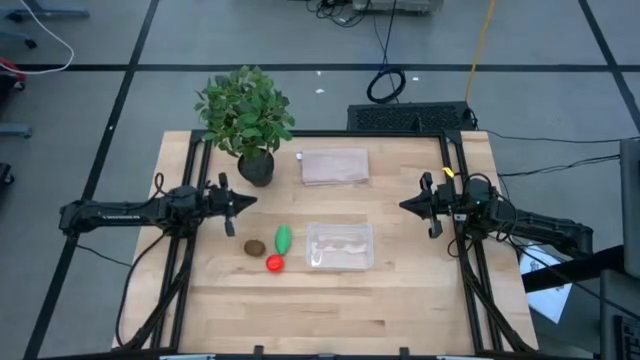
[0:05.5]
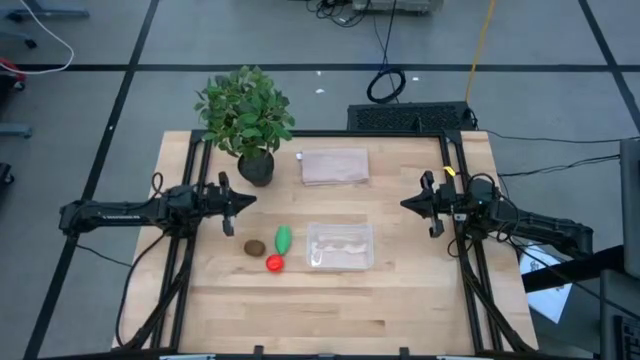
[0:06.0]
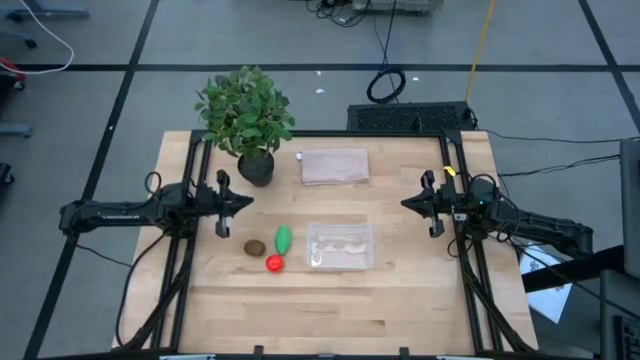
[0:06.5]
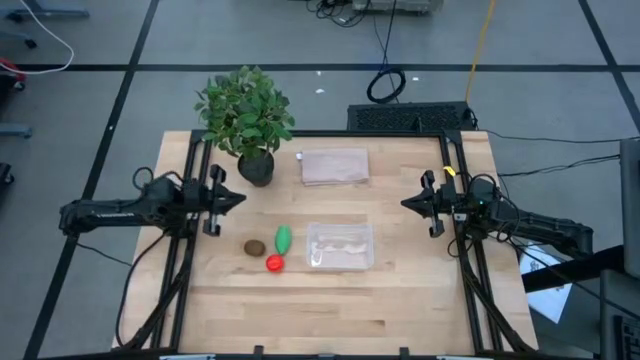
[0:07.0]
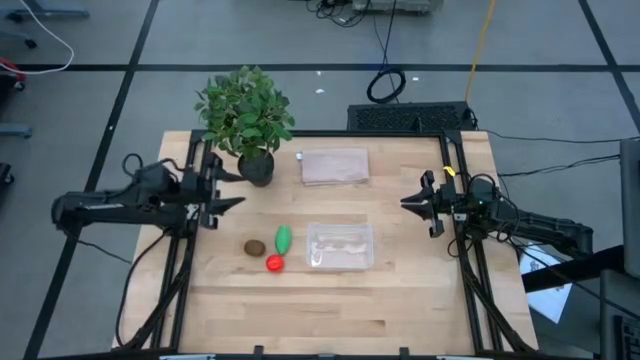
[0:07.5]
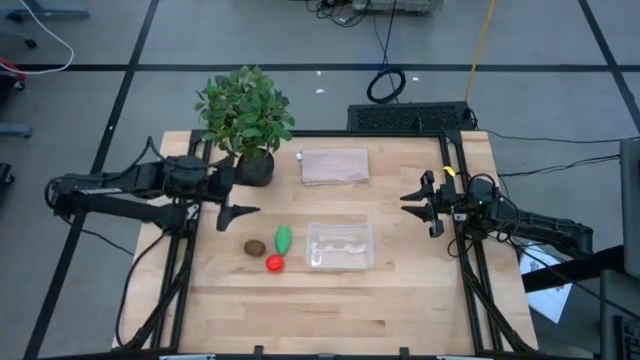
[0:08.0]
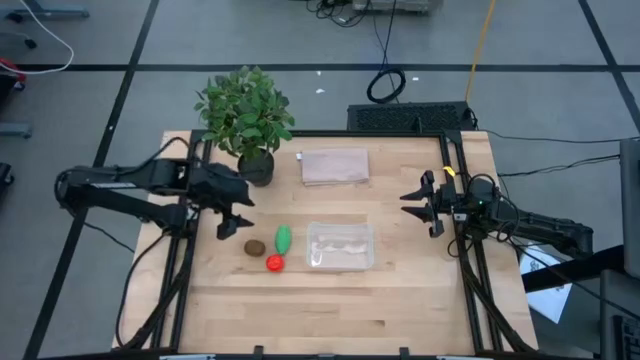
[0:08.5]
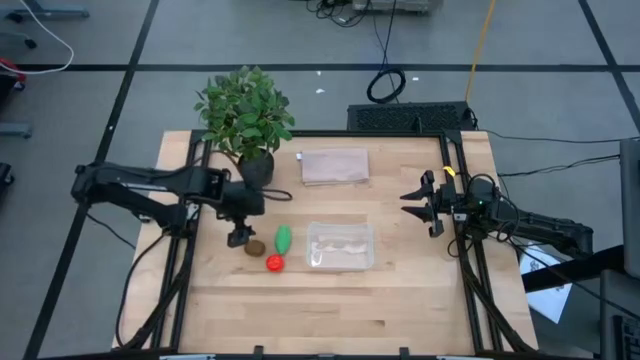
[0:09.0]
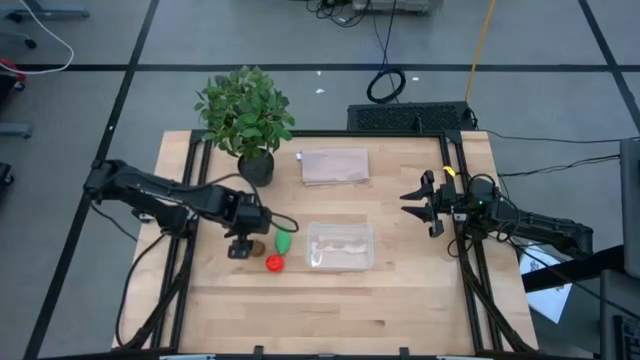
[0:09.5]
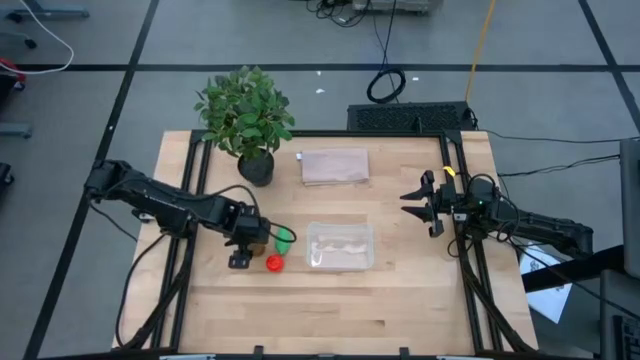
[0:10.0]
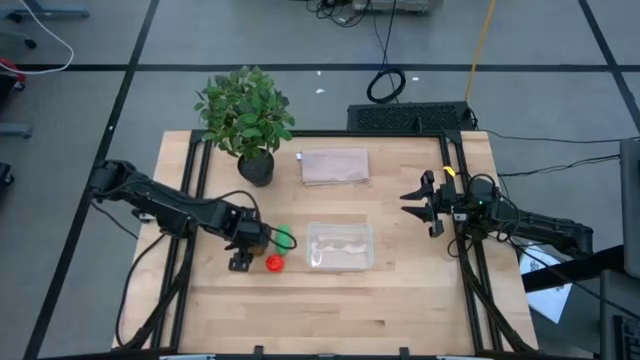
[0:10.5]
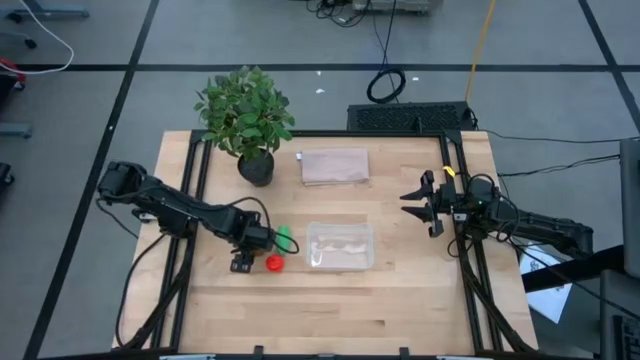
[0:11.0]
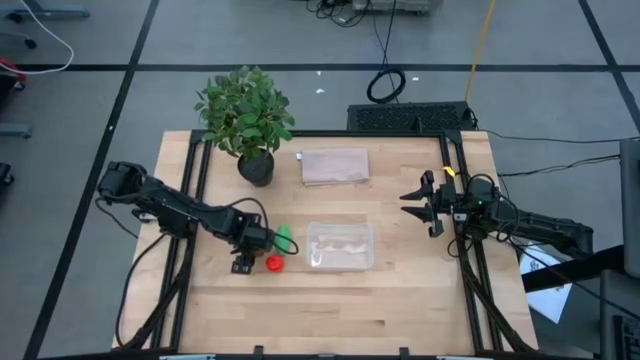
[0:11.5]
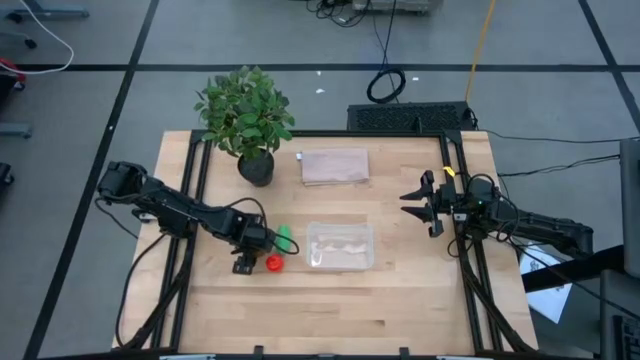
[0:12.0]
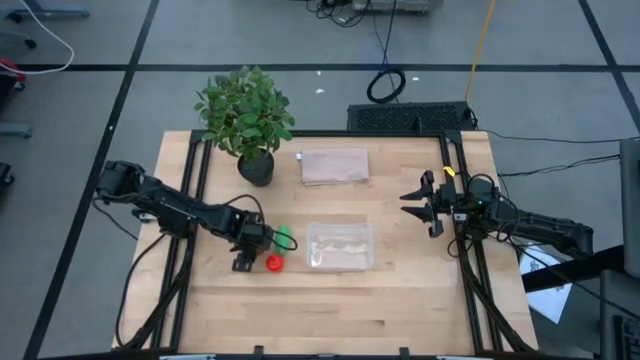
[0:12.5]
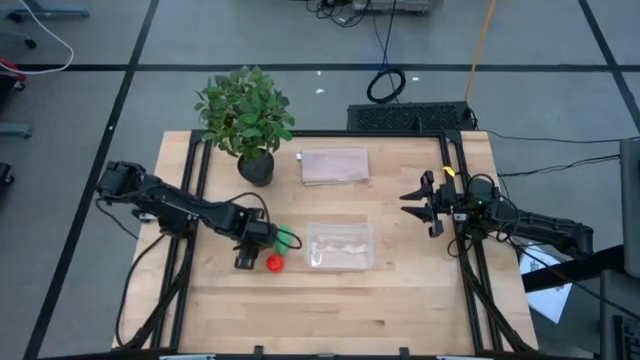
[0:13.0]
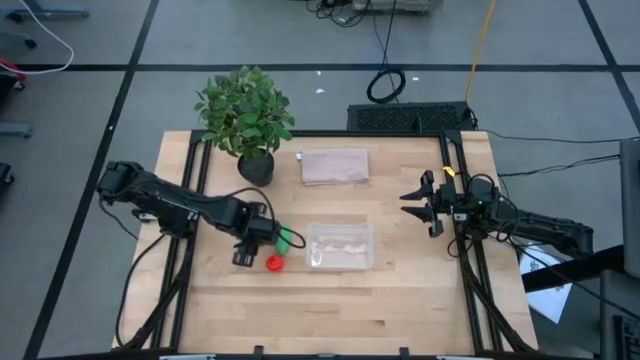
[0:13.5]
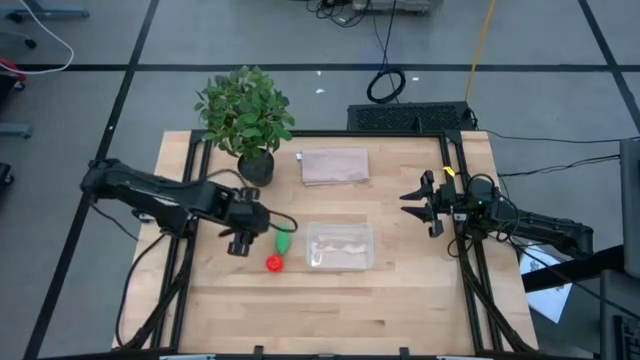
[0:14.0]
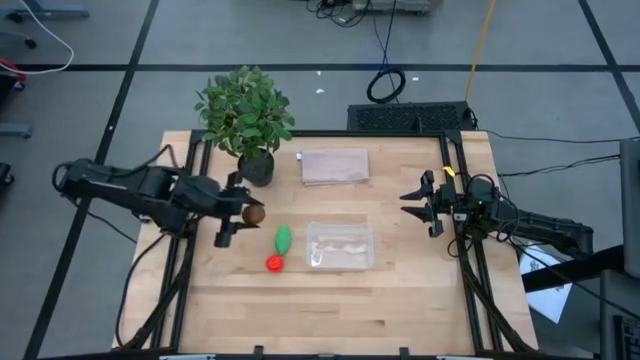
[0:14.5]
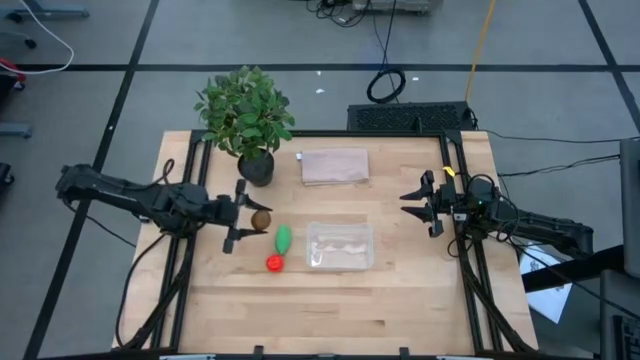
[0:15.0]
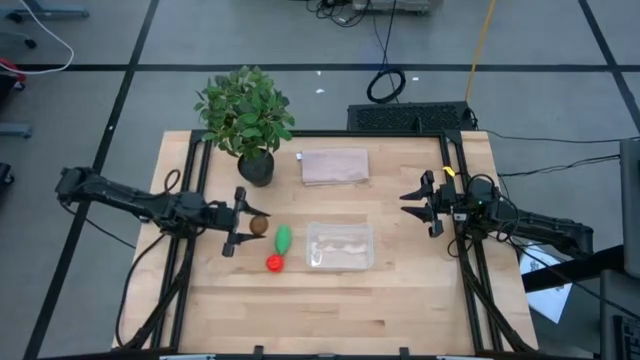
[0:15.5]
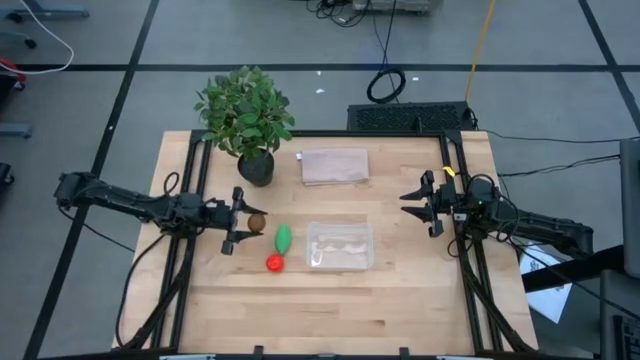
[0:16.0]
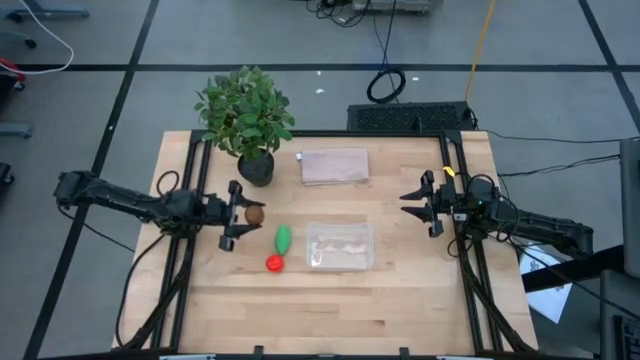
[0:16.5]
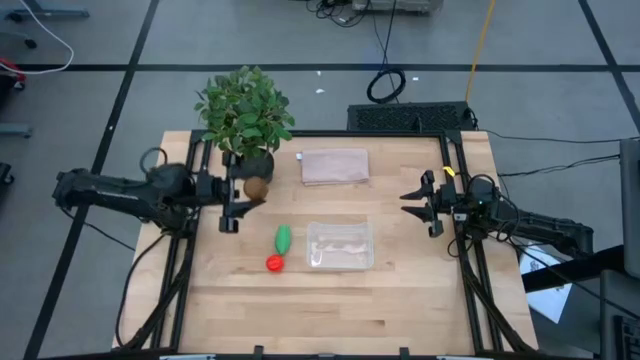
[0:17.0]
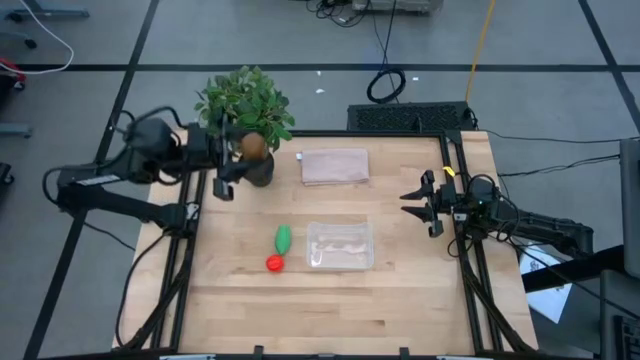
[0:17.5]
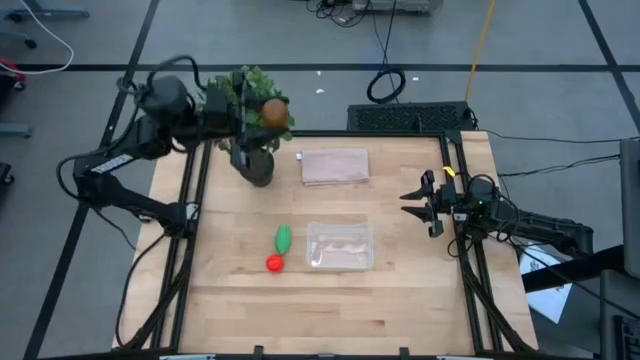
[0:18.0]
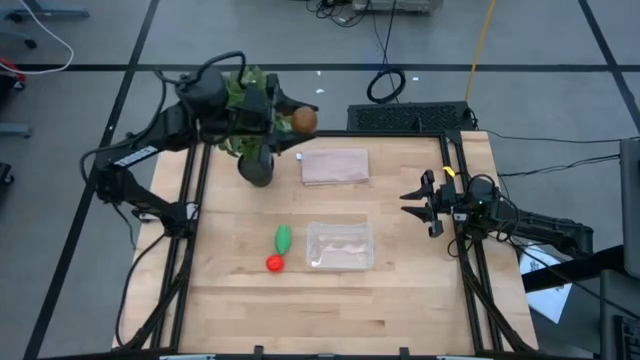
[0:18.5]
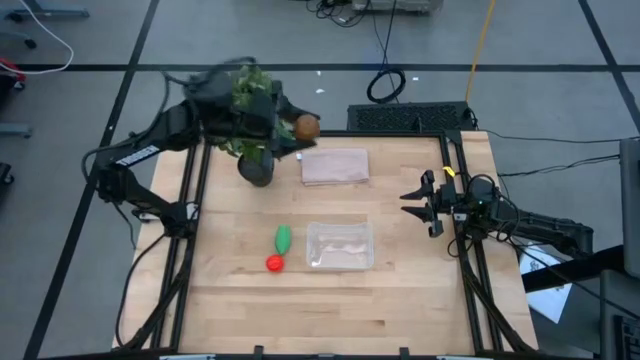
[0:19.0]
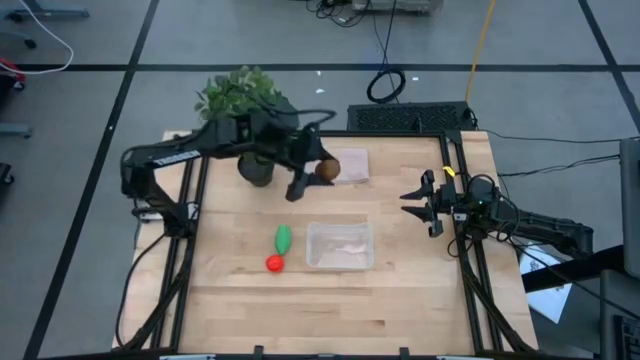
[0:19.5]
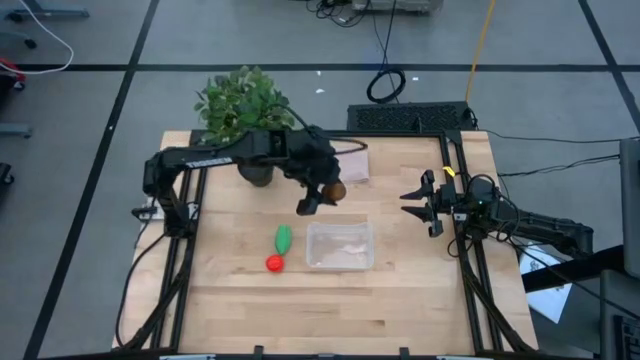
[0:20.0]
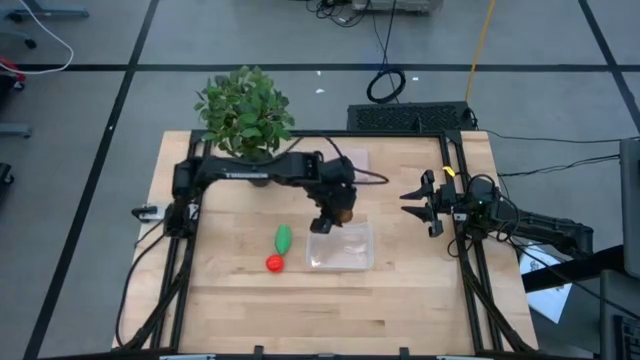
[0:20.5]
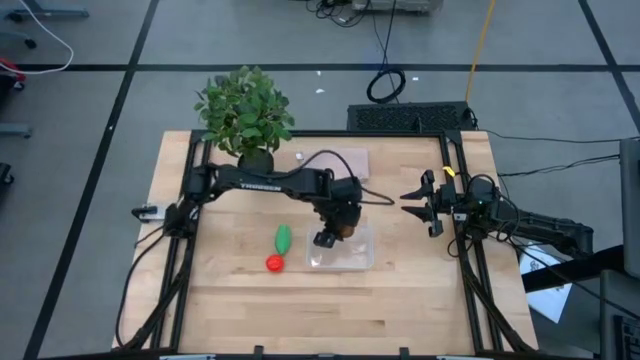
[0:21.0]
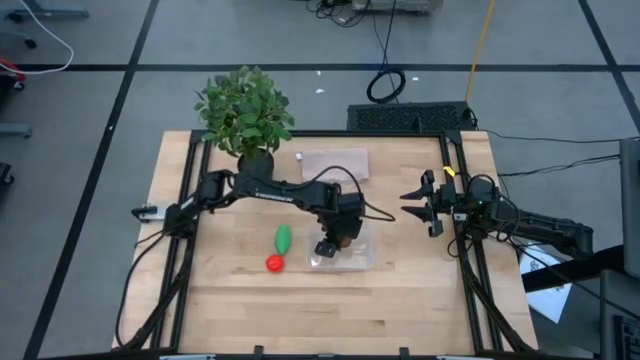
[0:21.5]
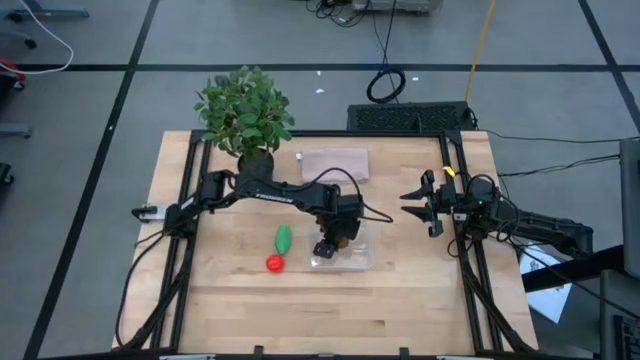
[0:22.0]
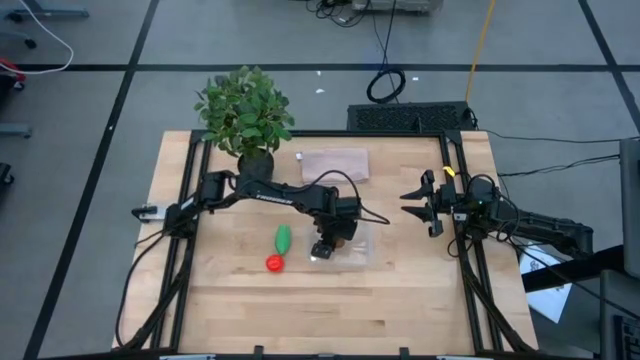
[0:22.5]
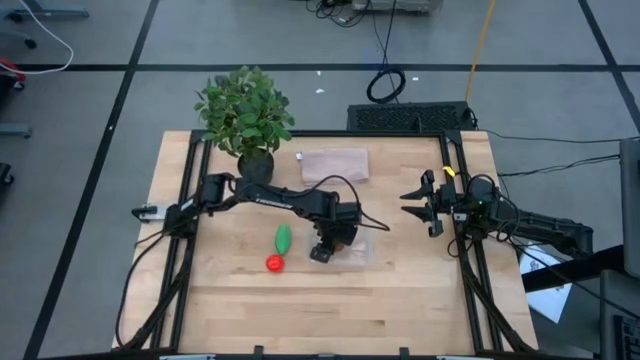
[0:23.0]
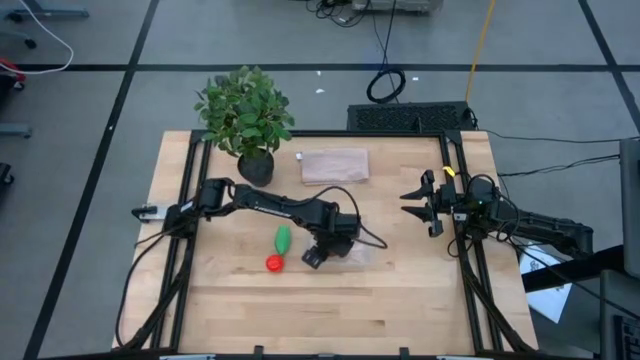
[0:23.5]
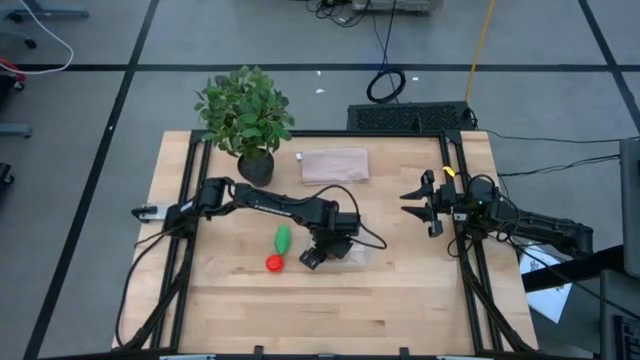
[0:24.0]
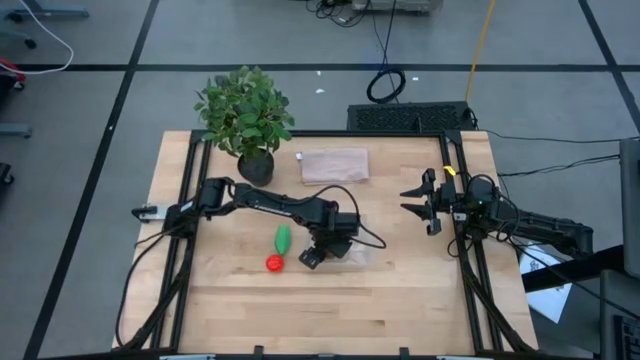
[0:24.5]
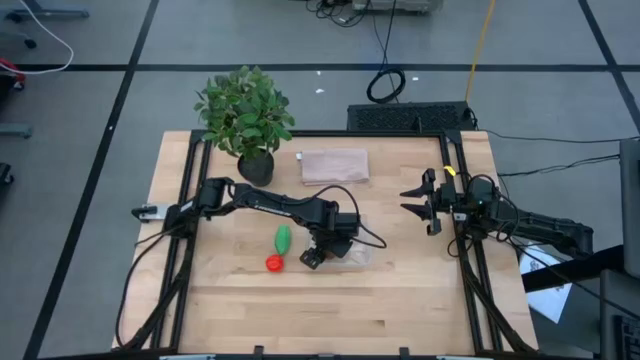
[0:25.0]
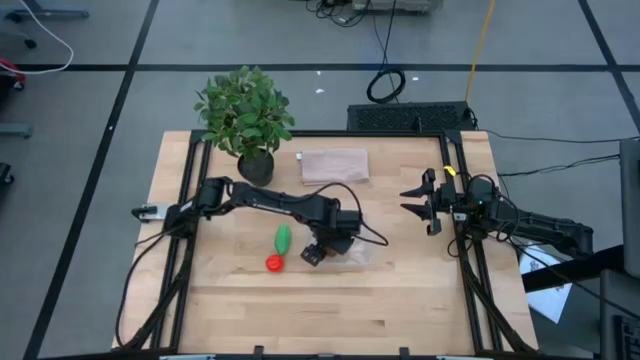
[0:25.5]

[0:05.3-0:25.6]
Task: Pick and placing Produce into tupperware
Put the brown kiwi into the transparent bin
